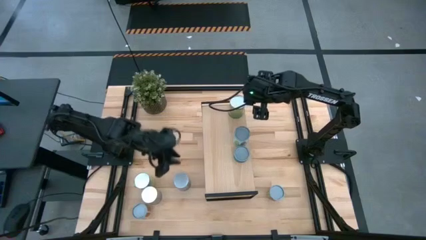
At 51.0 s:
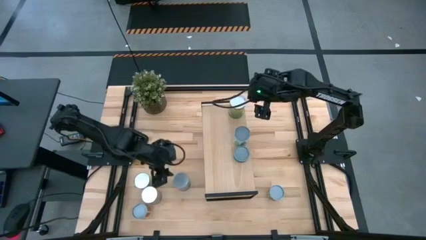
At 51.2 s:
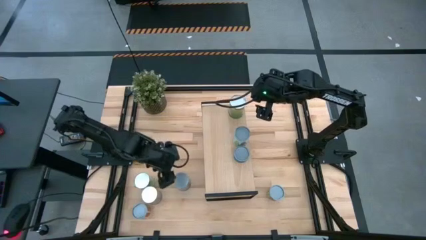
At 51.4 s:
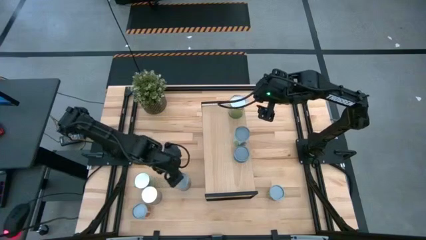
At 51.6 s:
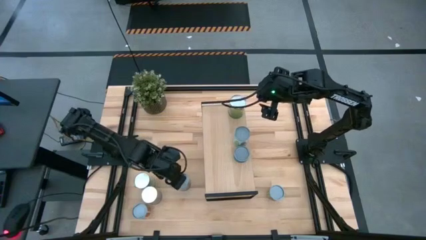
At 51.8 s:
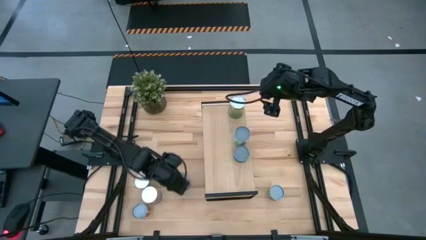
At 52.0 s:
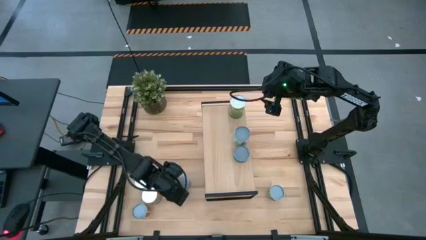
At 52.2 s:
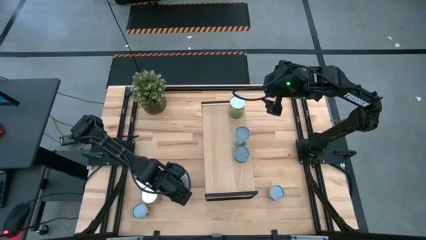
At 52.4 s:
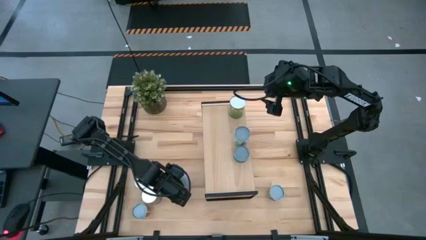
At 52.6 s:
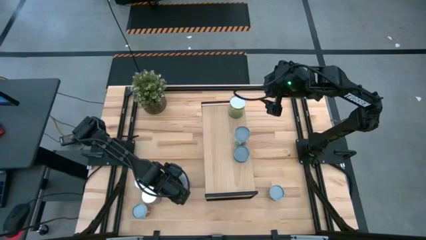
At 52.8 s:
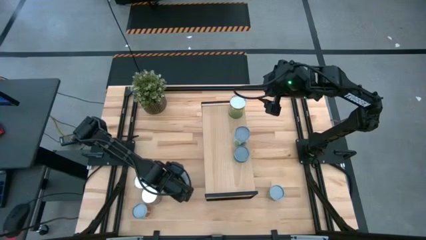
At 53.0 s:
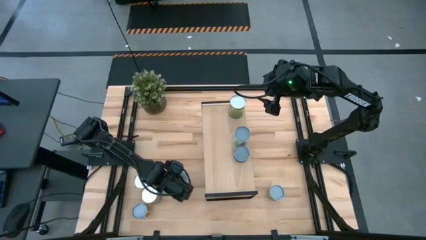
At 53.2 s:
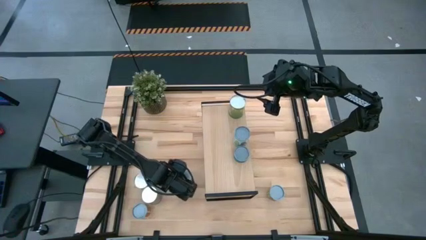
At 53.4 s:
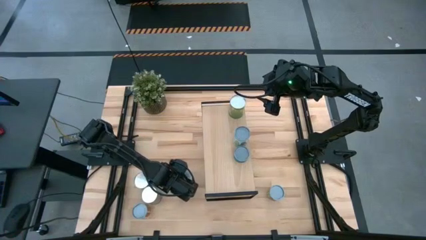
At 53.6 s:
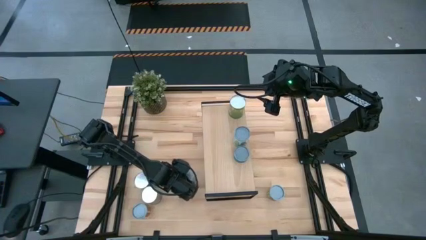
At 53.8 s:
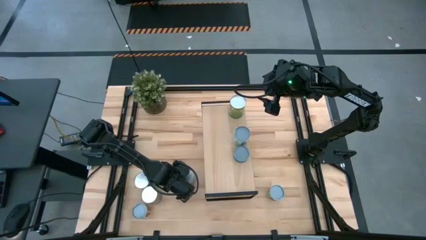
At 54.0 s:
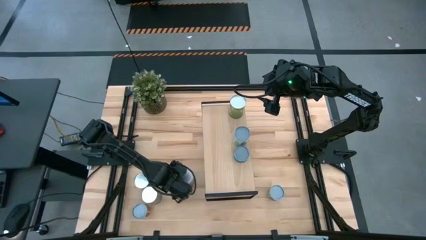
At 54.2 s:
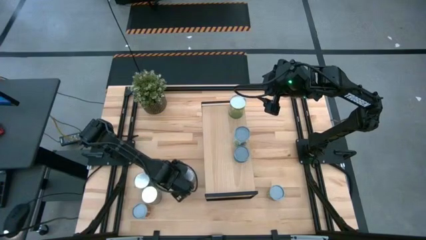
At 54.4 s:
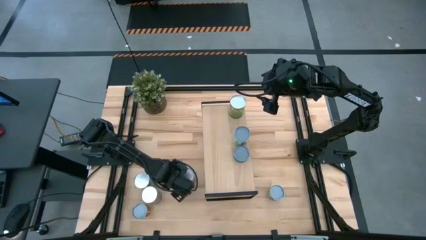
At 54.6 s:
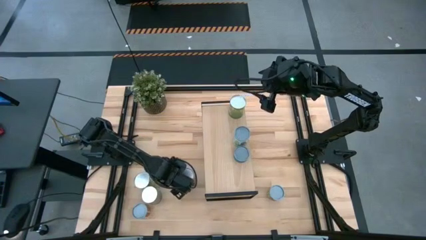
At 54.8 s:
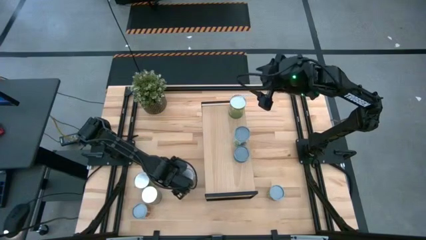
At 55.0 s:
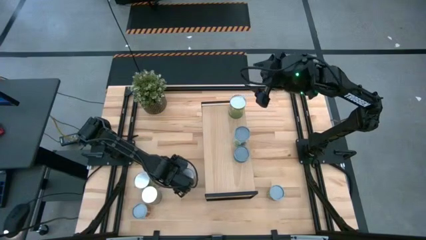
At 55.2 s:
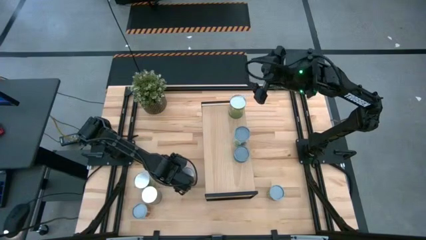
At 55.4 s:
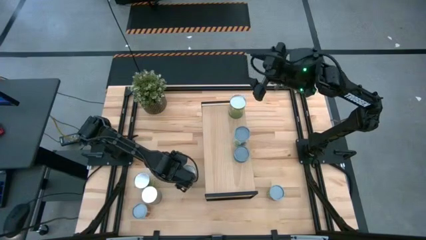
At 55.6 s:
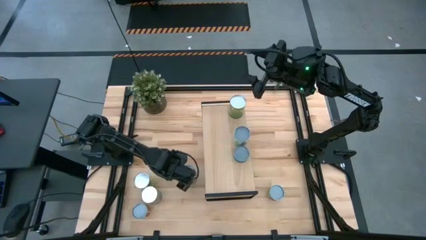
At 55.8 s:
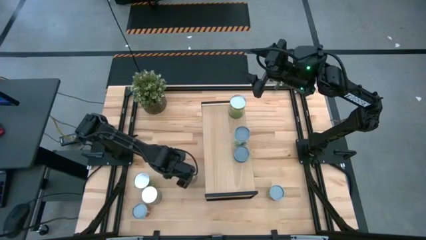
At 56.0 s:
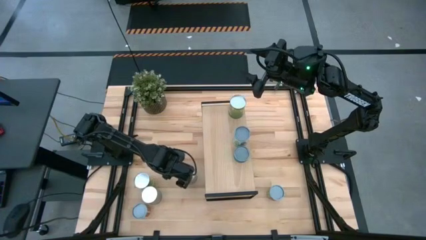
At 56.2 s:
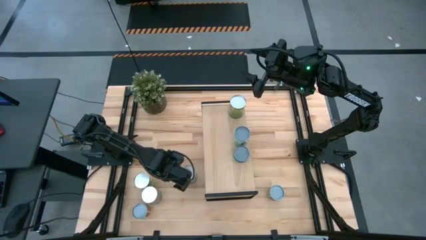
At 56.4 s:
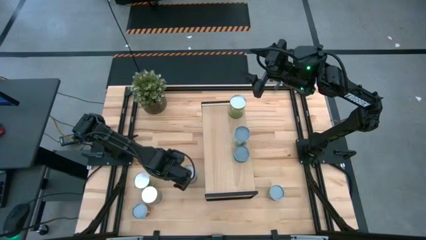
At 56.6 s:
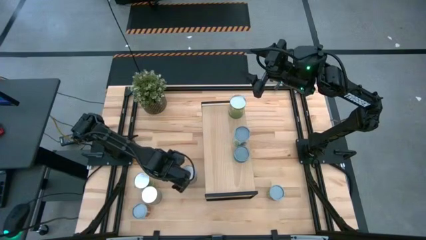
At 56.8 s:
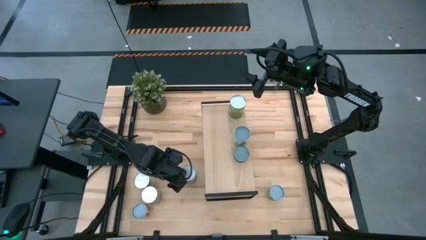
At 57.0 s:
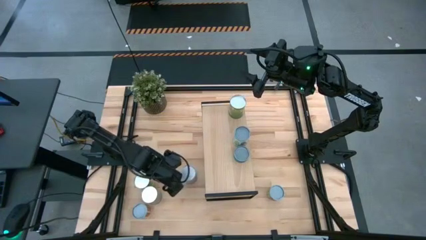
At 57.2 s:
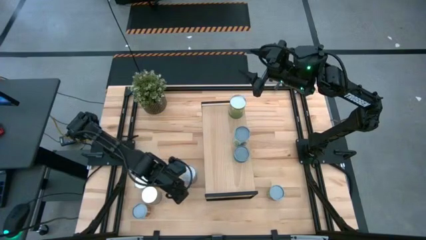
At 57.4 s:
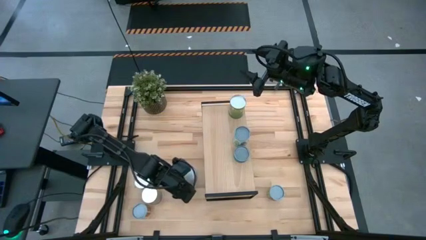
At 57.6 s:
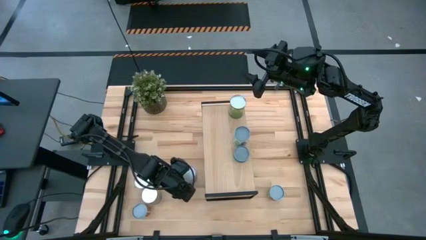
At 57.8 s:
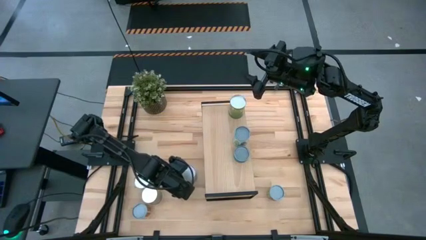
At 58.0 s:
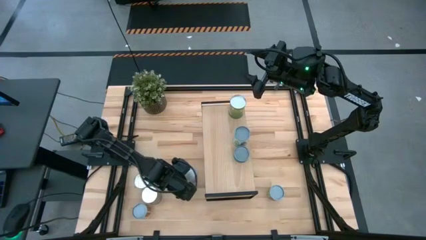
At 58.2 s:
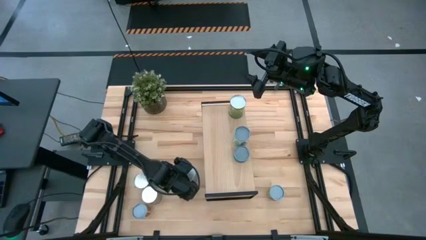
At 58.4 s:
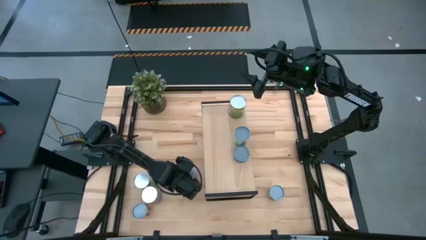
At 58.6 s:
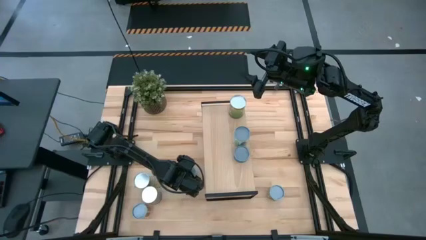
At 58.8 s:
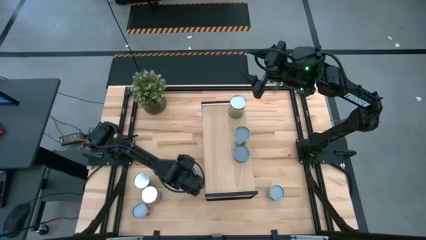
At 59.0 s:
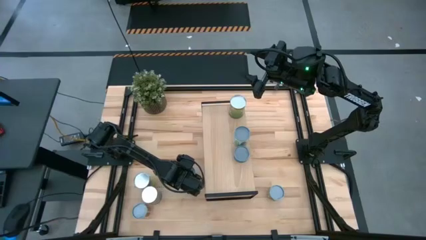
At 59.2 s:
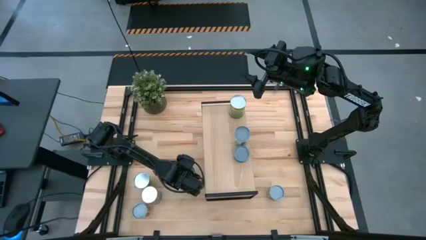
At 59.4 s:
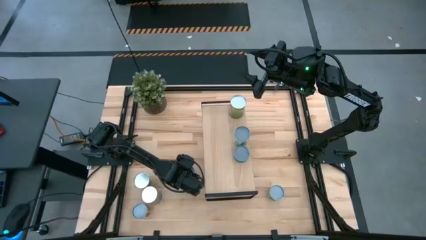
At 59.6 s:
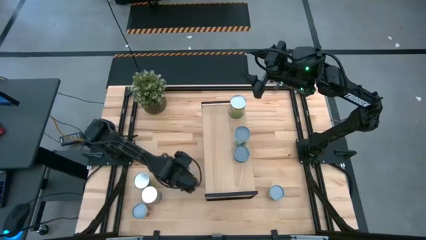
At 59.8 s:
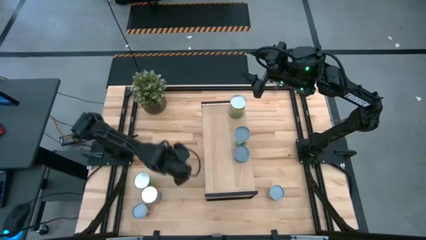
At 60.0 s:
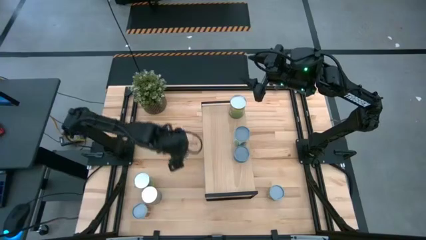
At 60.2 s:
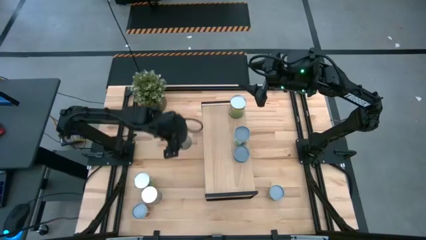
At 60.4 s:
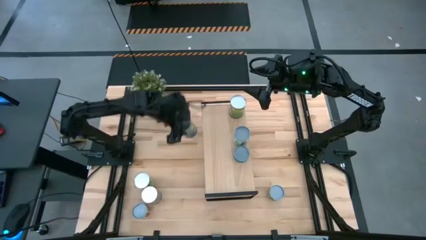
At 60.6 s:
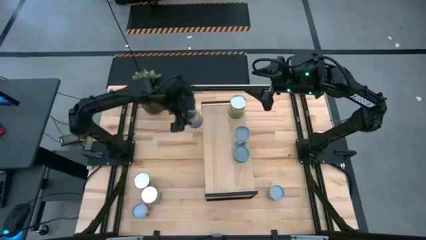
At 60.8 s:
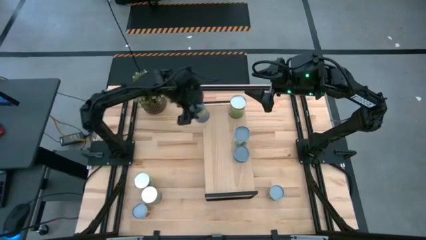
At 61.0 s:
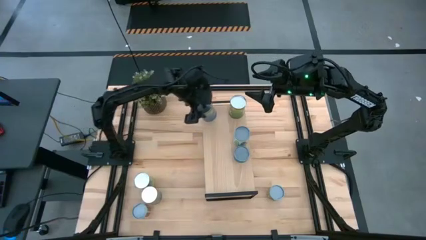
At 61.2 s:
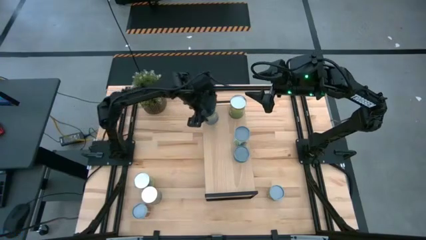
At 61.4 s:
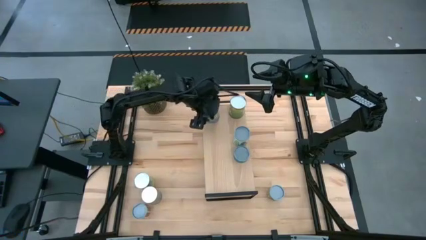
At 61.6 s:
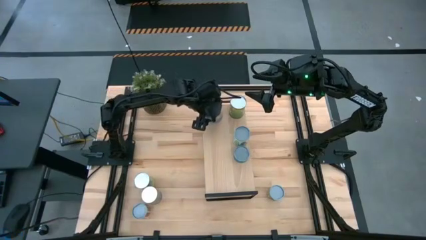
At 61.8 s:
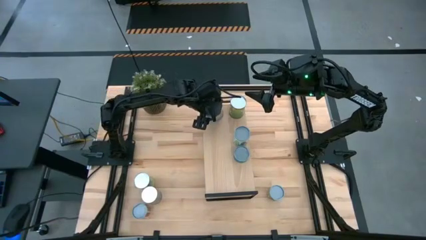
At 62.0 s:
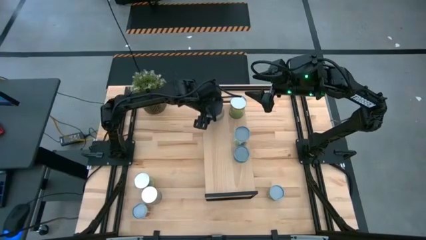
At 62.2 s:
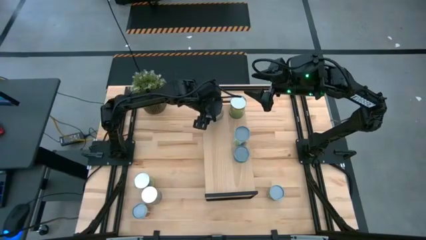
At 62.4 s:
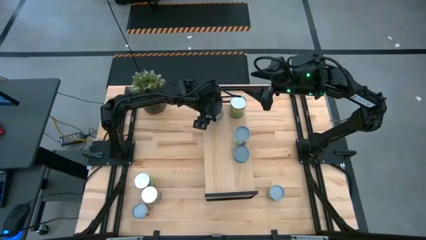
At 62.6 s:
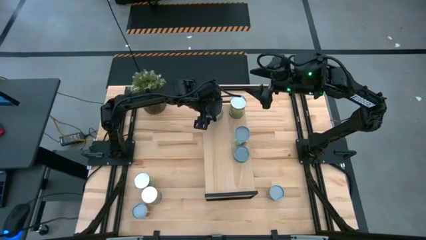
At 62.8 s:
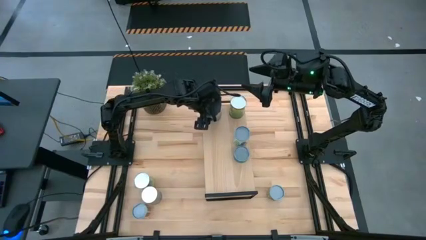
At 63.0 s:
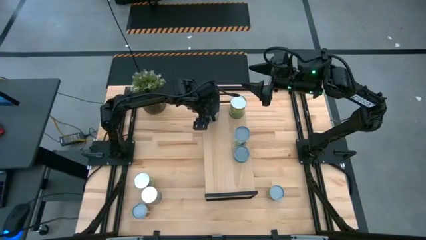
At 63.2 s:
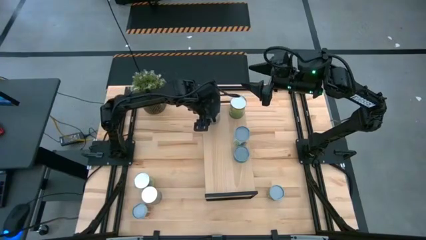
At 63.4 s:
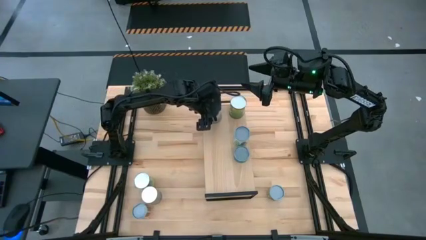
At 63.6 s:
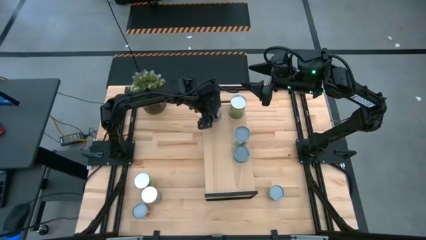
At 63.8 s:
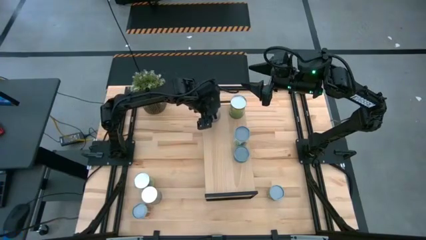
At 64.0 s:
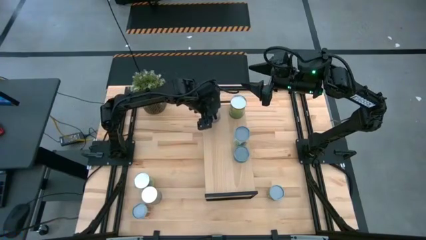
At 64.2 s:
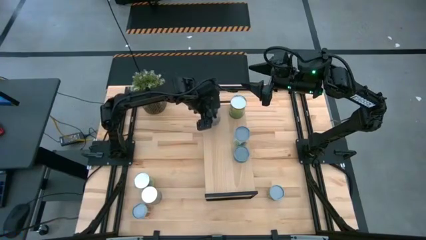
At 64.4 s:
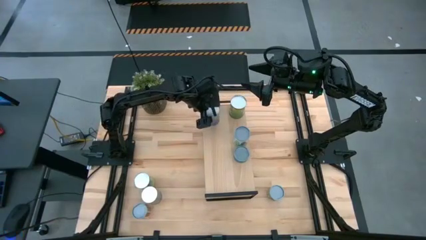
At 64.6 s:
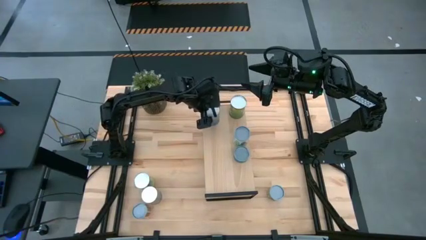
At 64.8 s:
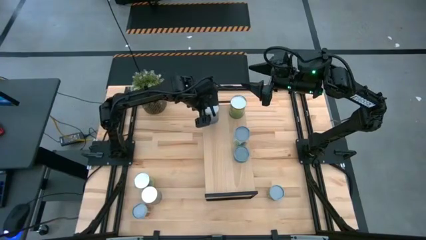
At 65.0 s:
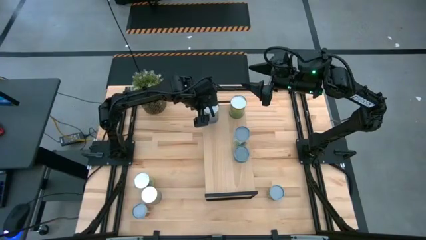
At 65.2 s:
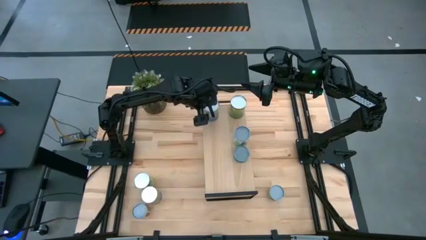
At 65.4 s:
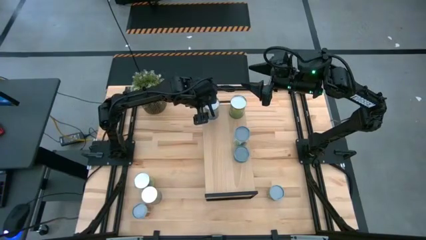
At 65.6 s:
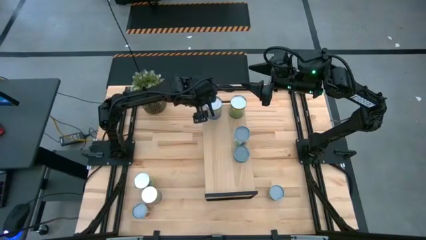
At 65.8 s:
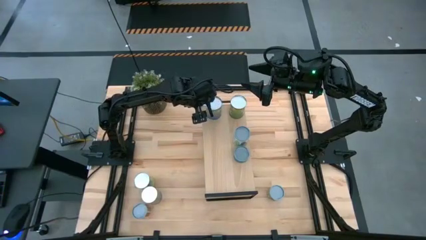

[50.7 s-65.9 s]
Task: Pick and place cans onto a shelf
Put the canned peas on the shelf
